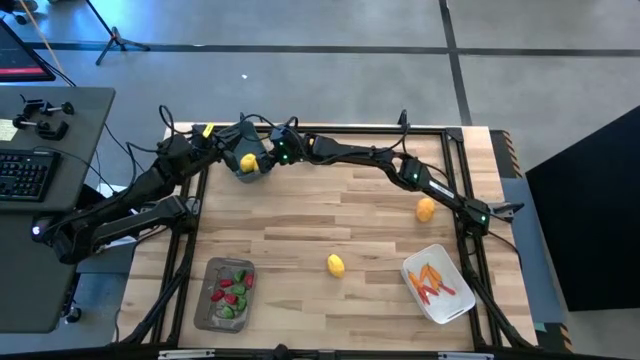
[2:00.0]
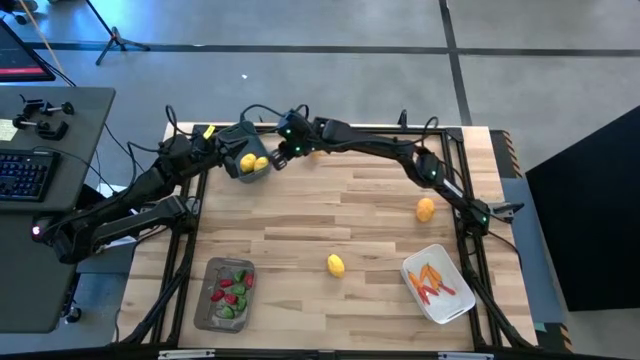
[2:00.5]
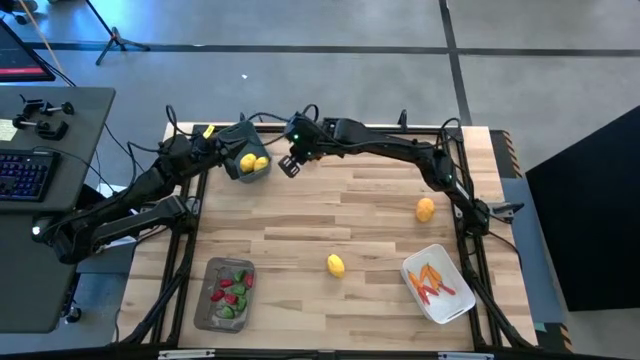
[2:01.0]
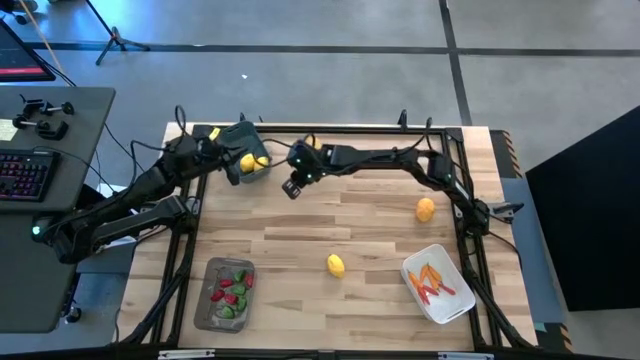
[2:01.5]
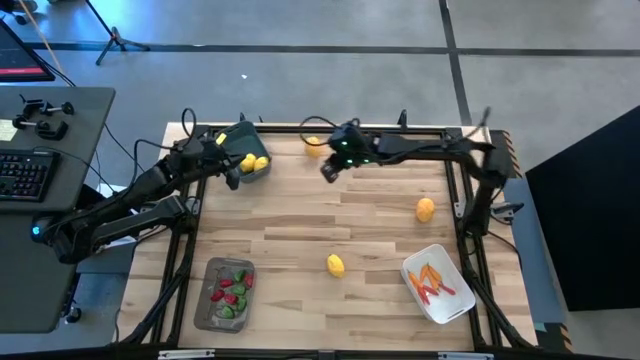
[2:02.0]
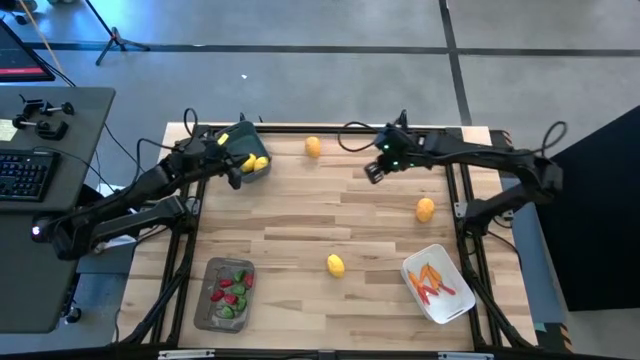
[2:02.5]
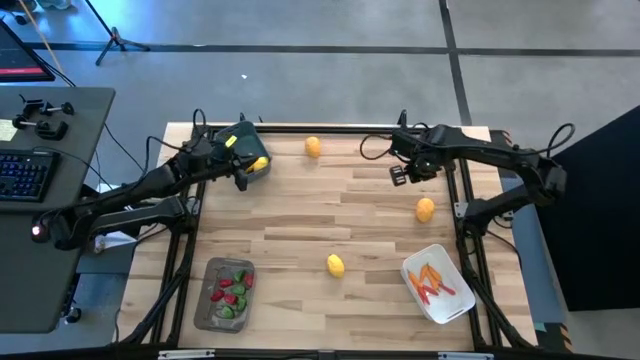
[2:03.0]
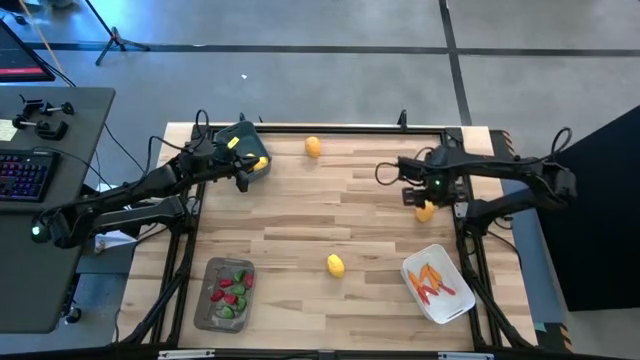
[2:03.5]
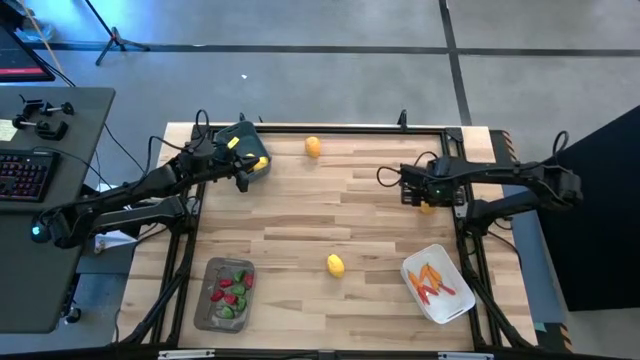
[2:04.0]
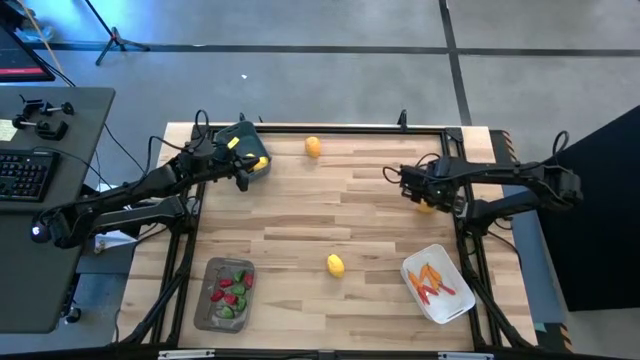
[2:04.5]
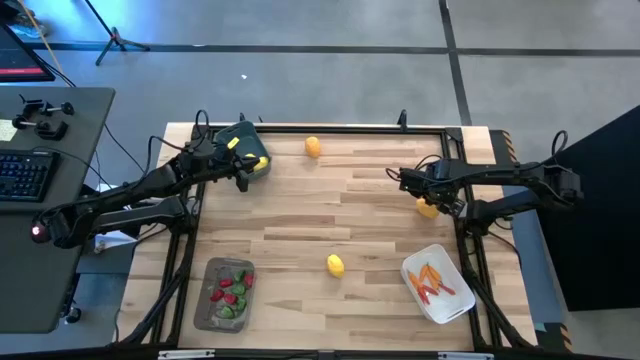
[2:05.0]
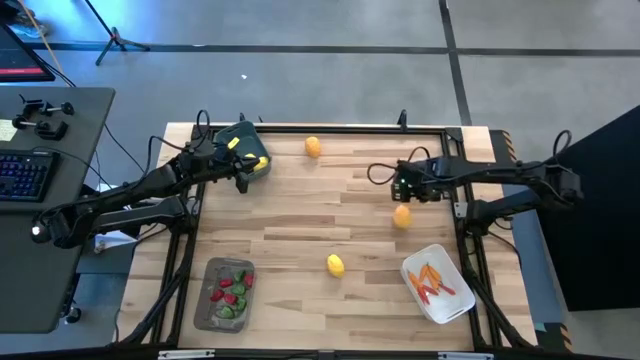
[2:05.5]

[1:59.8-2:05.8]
Task: Sort produce into baskets
Put the lemon into the blue bin

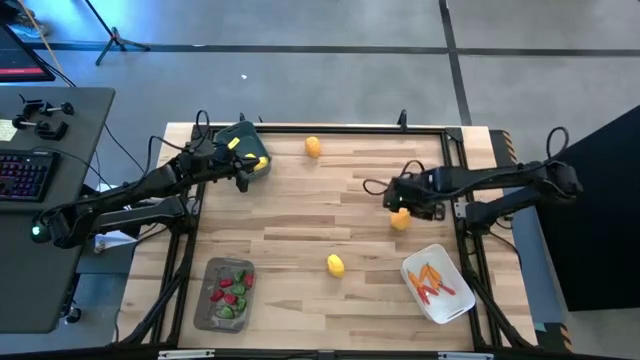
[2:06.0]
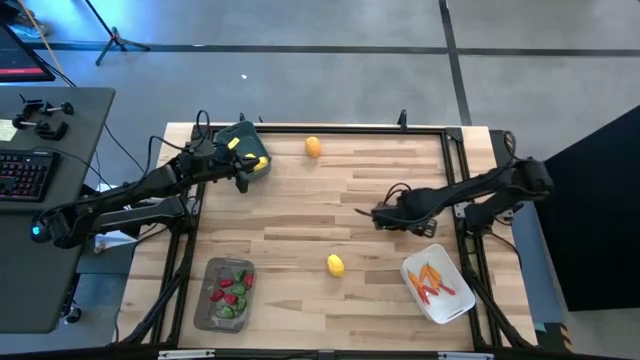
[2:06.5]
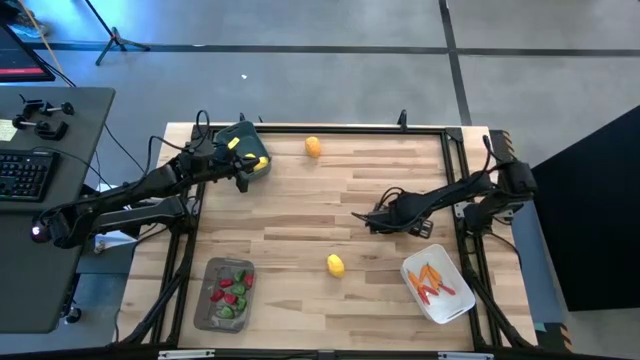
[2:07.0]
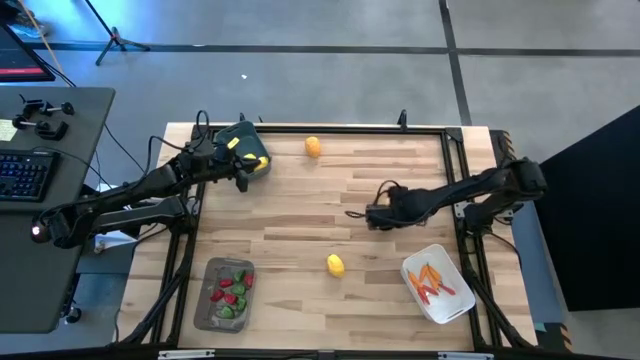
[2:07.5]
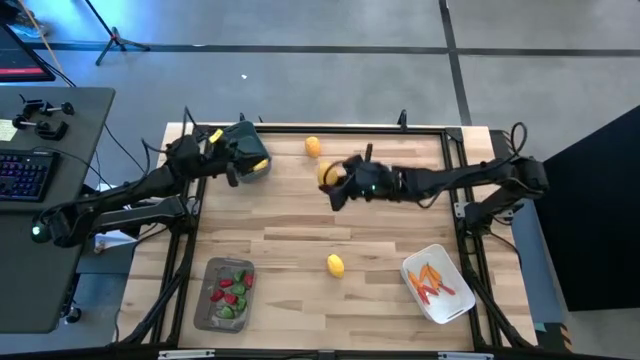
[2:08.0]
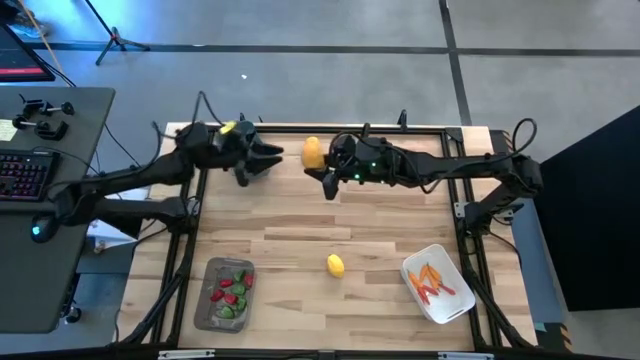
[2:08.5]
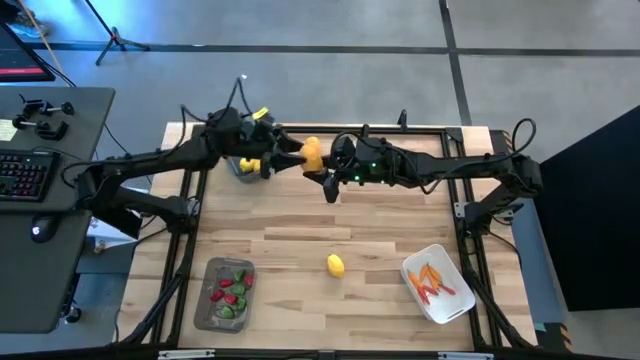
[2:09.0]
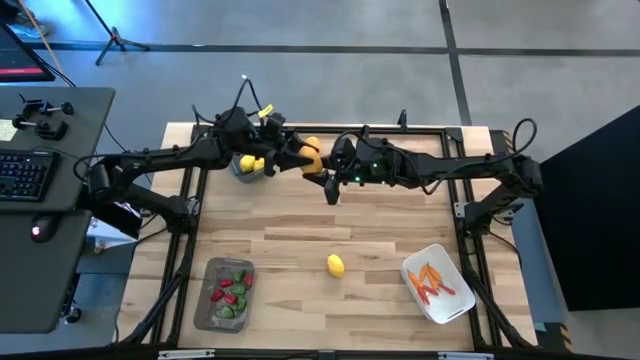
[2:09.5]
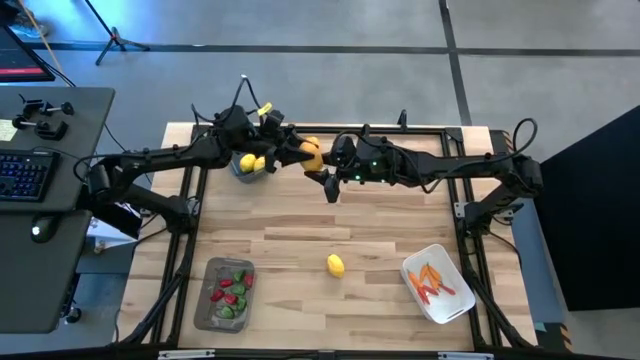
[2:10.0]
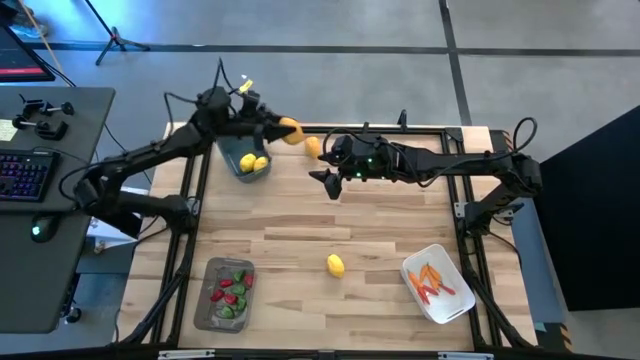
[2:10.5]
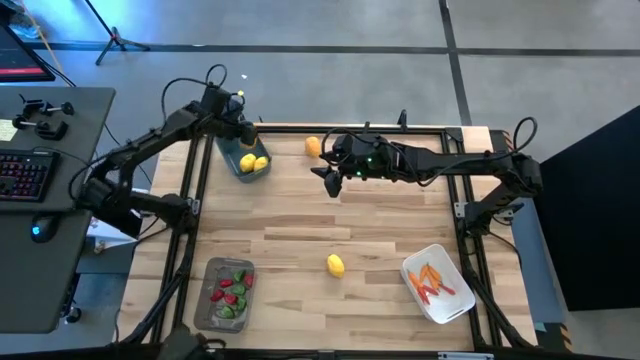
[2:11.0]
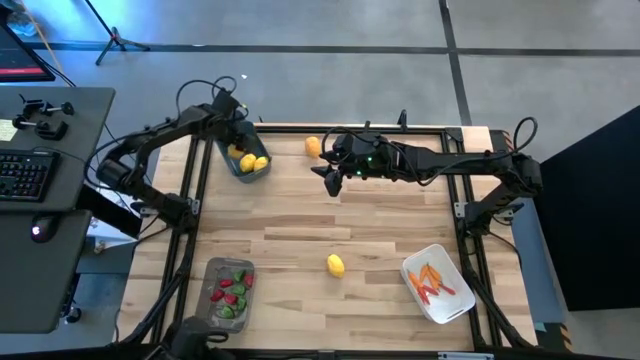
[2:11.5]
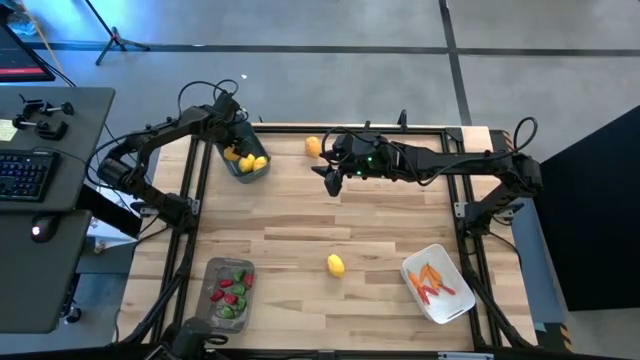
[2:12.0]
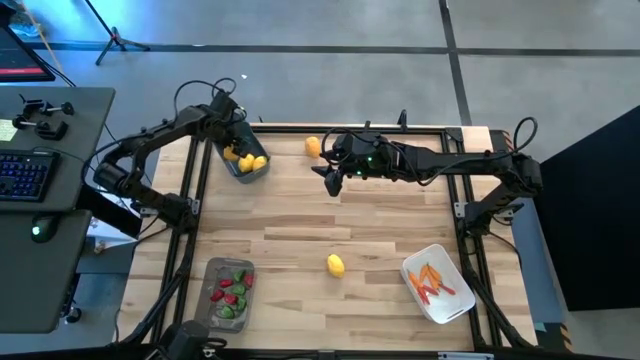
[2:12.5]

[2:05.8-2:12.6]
Put the lemon into the blue bin

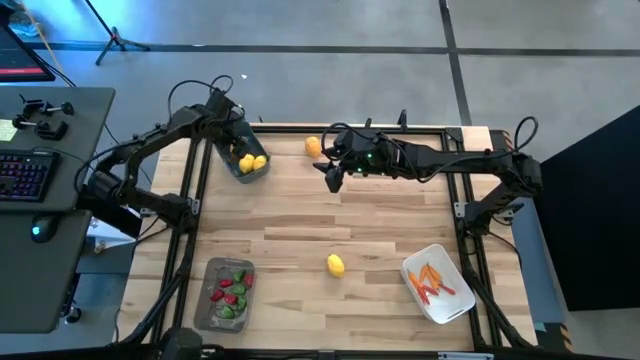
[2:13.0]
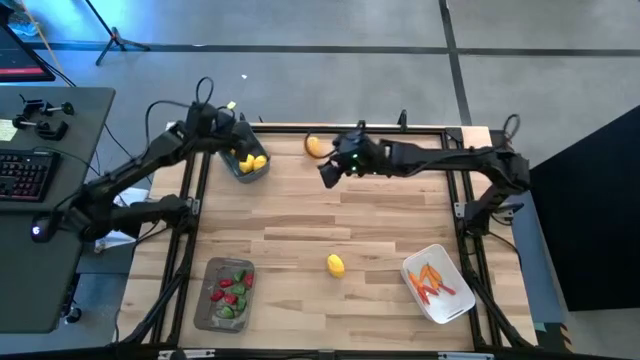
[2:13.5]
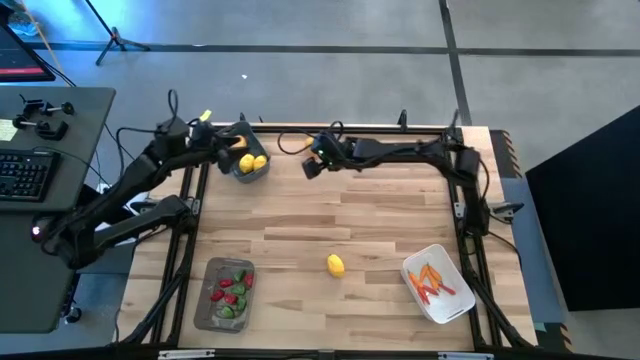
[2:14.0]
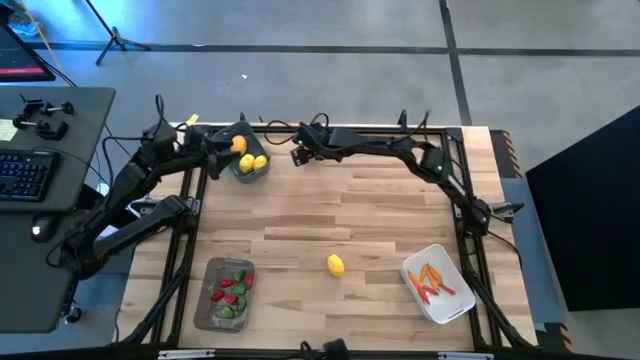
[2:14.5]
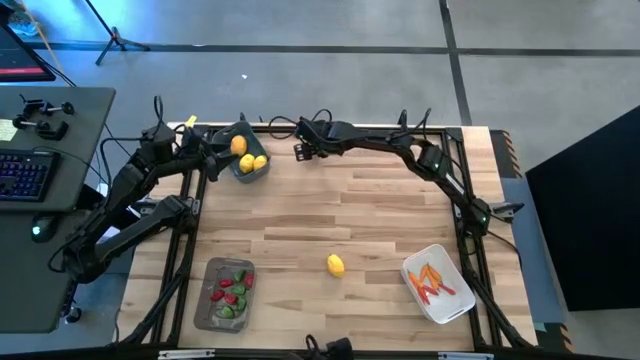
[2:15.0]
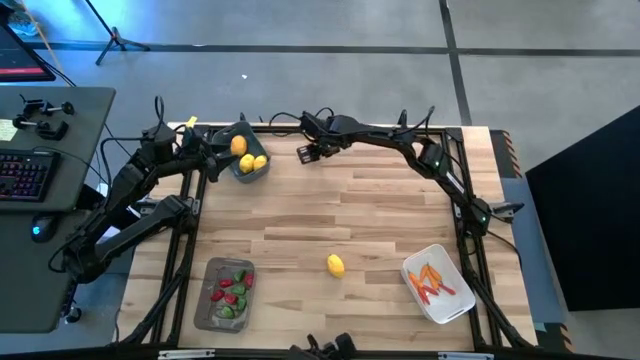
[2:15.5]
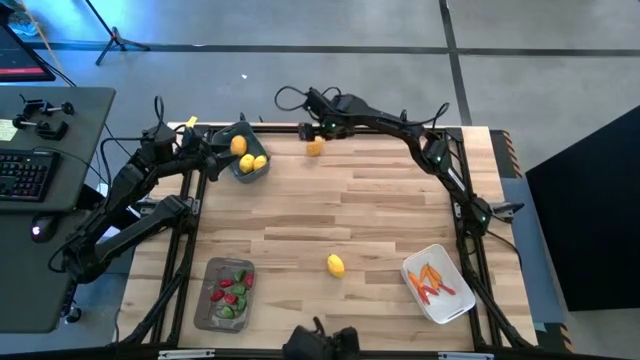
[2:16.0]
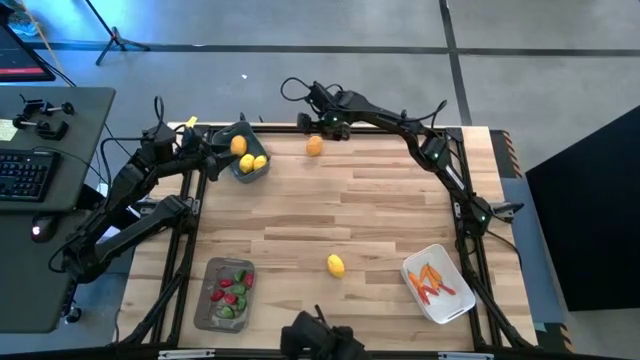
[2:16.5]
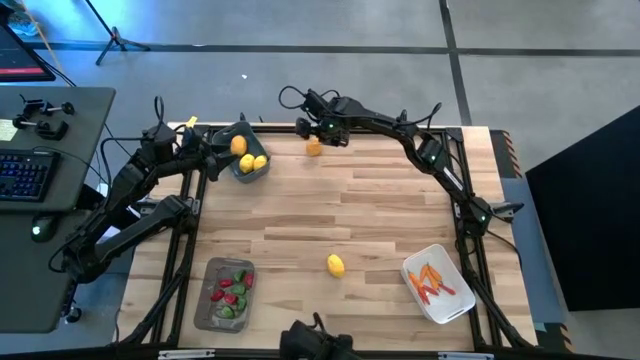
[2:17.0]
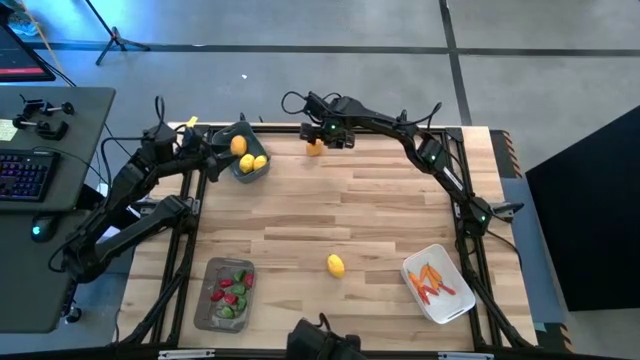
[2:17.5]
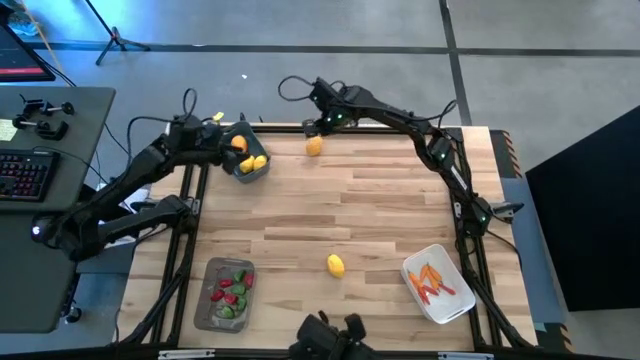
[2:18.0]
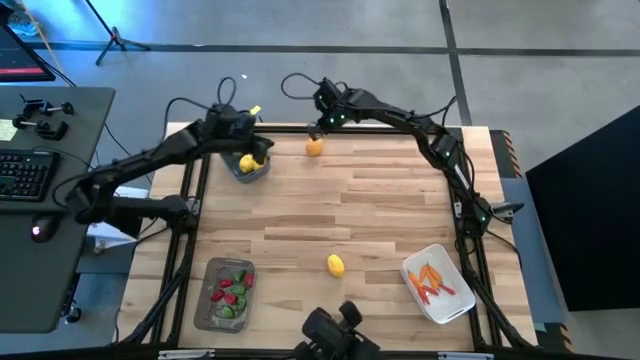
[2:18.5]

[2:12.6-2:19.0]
Put the lemon into the blue bin

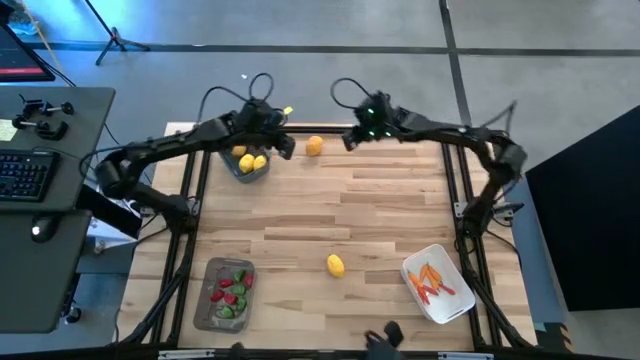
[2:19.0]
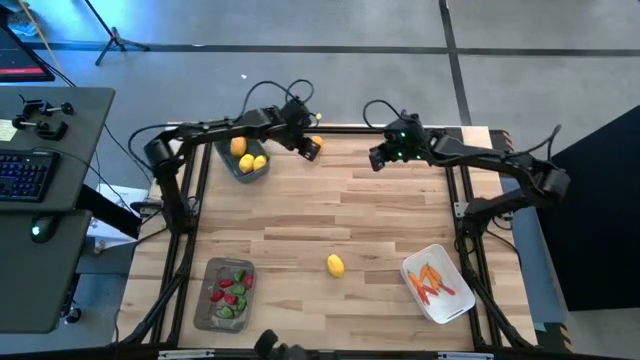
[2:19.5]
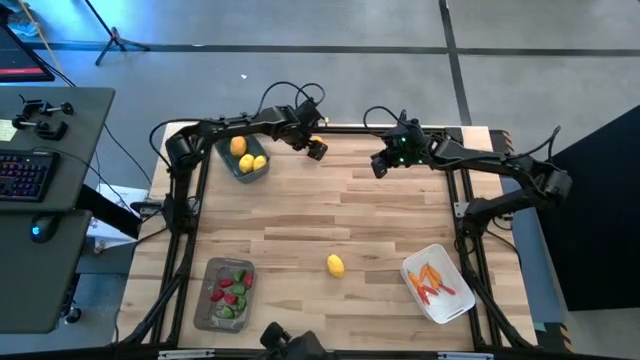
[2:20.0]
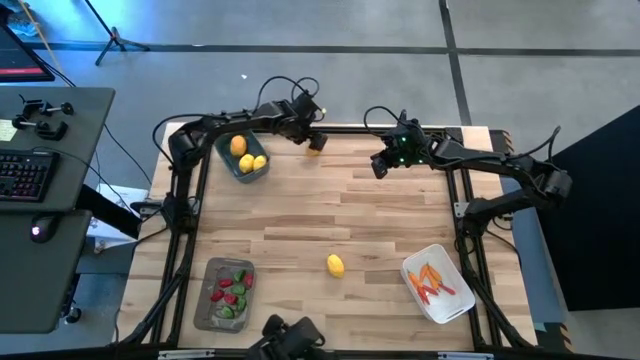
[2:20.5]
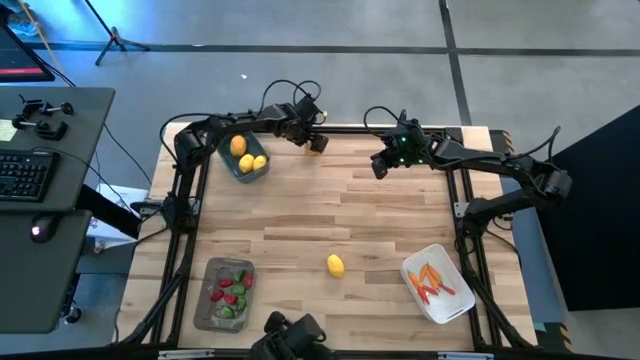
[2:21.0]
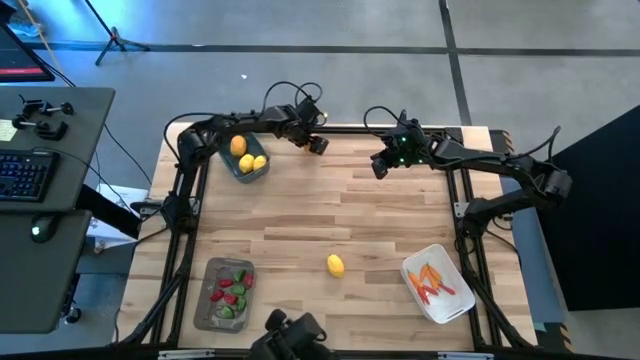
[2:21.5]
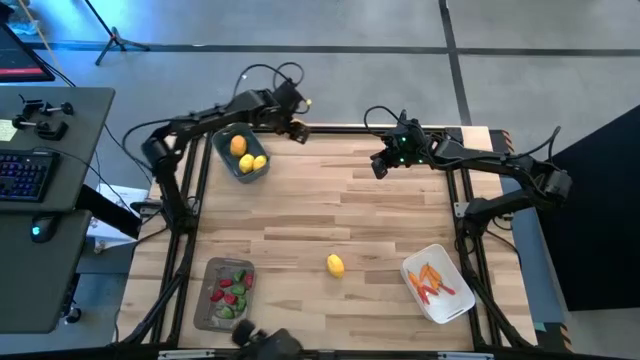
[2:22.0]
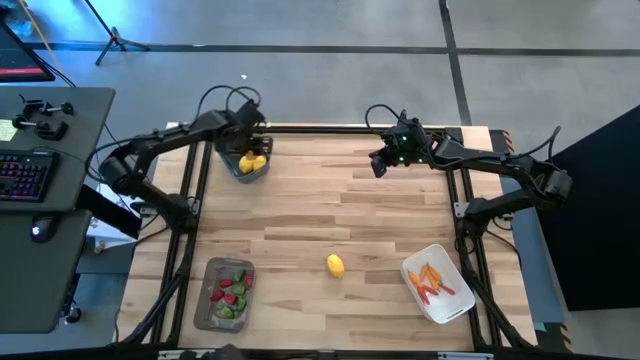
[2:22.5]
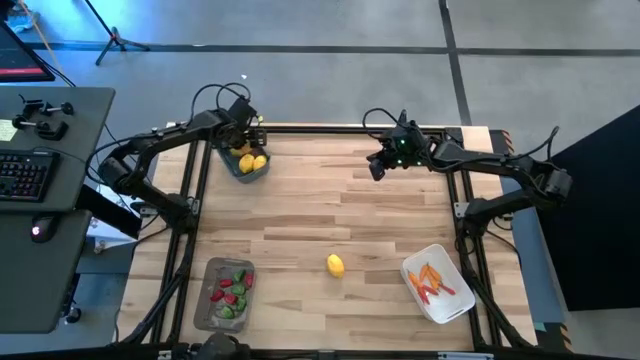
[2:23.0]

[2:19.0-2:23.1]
Put the lemon into the blue bin
